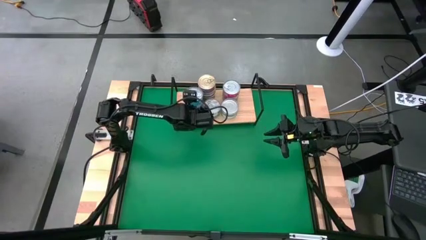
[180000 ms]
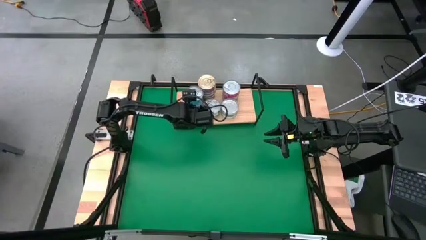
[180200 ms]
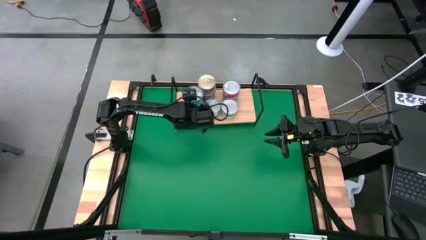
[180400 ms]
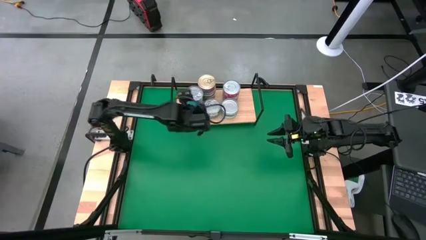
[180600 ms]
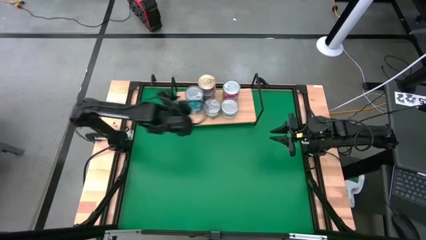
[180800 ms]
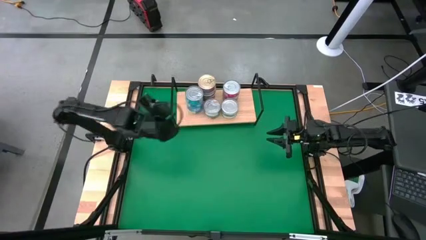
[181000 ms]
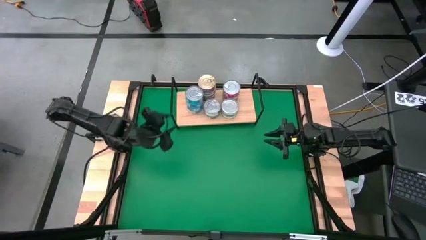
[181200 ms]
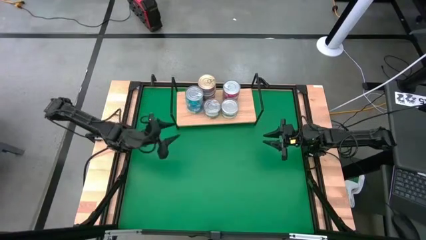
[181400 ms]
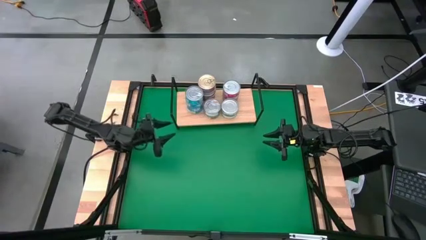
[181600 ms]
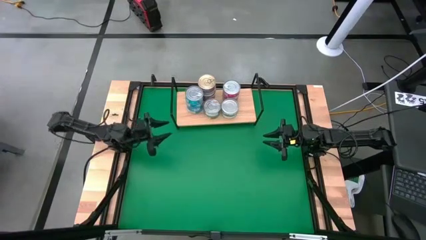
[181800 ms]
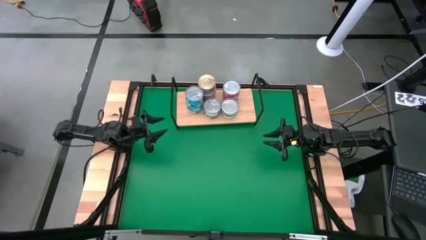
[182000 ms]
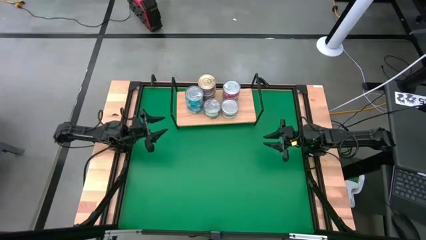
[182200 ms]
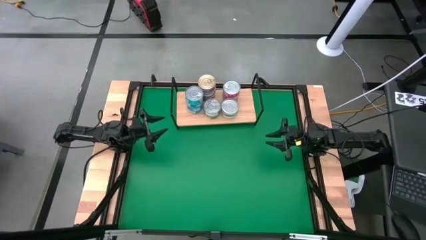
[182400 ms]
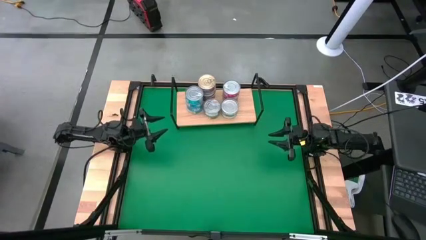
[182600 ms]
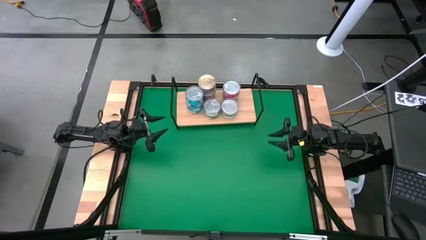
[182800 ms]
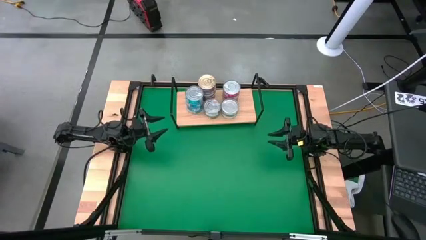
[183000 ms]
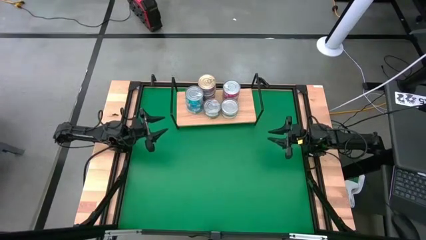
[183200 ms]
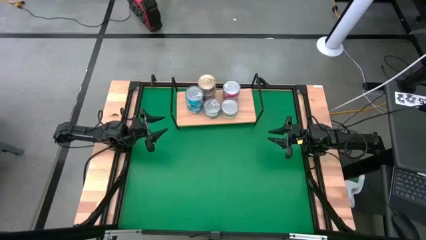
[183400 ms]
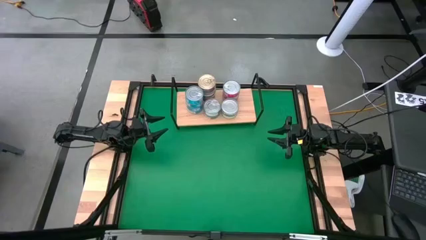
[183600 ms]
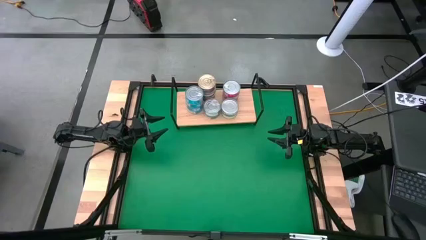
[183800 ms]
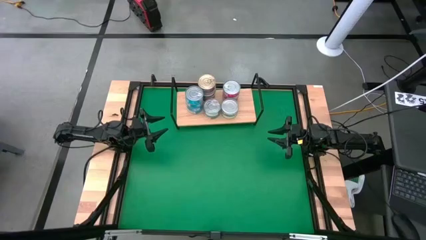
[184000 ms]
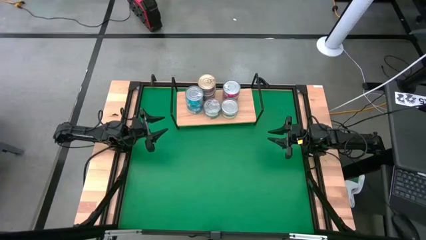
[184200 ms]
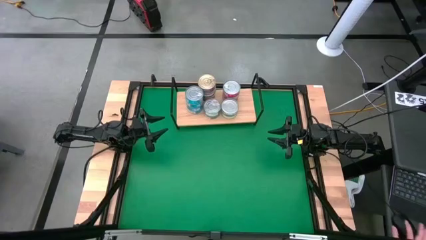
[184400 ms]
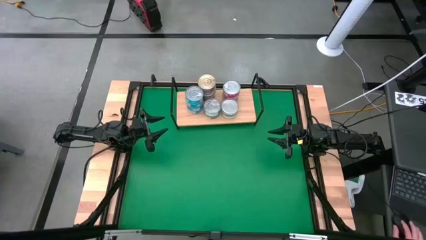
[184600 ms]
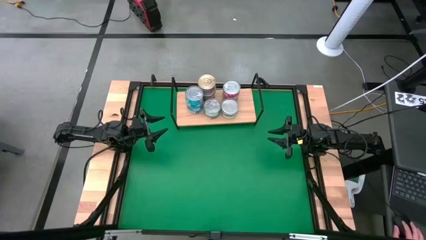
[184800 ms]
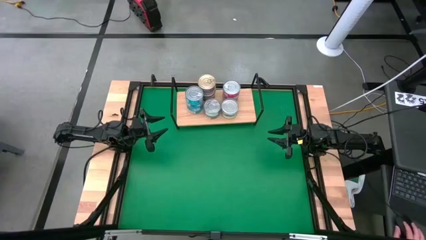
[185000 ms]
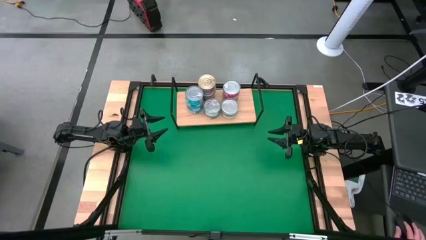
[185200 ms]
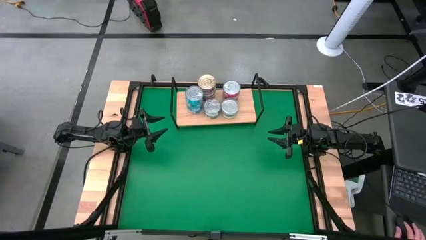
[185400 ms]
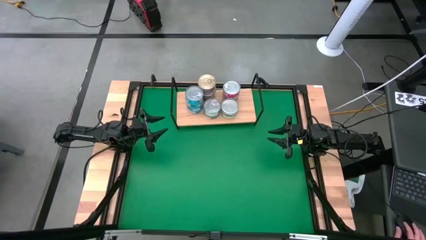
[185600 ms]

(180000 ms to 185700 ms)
Task: Stack canned seafood by type on shelf
Return to Home Position

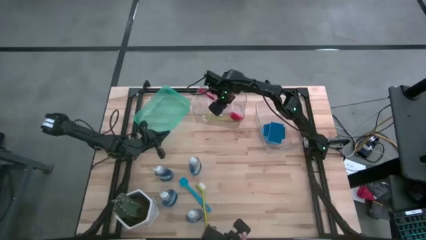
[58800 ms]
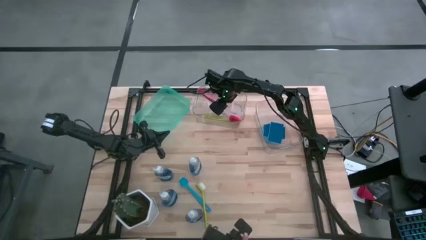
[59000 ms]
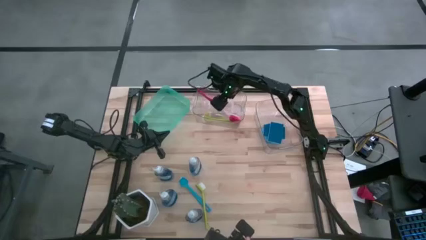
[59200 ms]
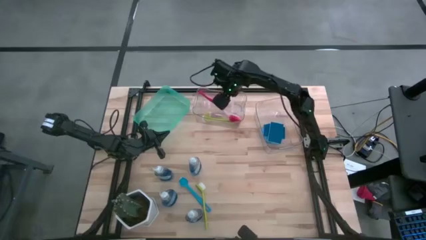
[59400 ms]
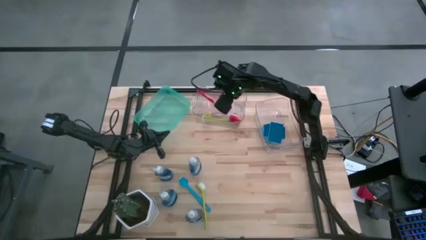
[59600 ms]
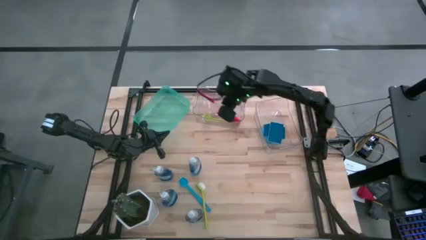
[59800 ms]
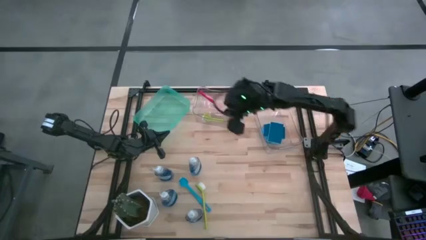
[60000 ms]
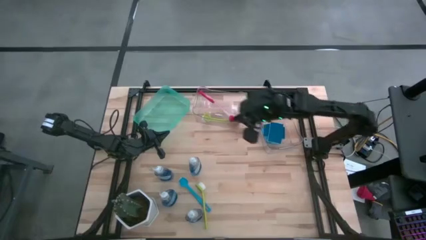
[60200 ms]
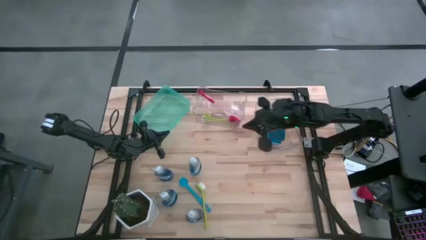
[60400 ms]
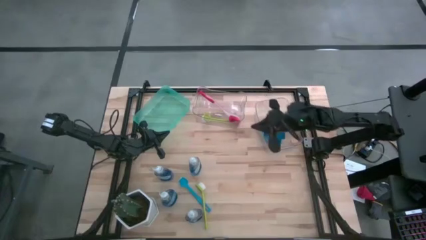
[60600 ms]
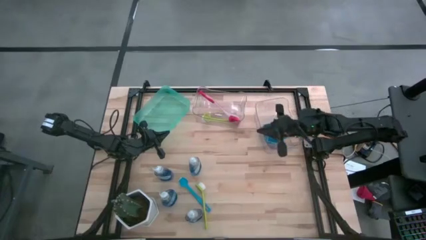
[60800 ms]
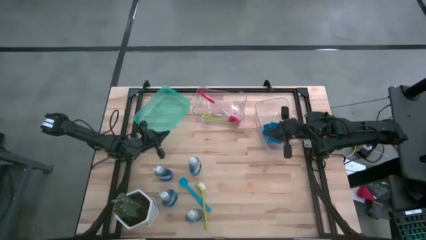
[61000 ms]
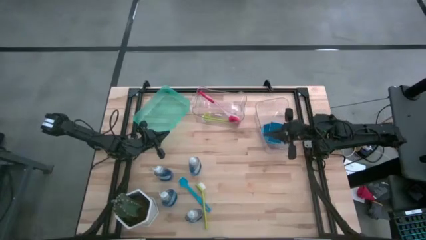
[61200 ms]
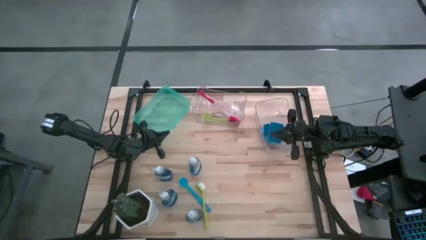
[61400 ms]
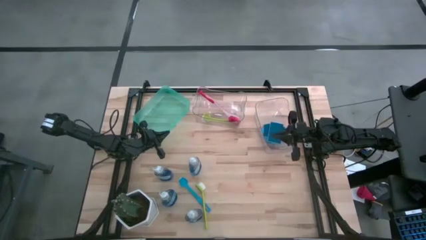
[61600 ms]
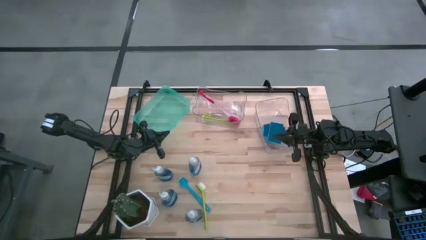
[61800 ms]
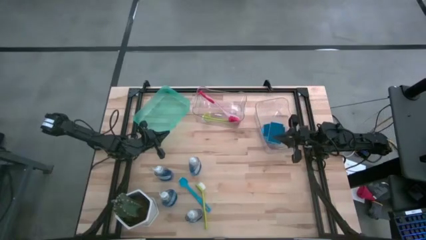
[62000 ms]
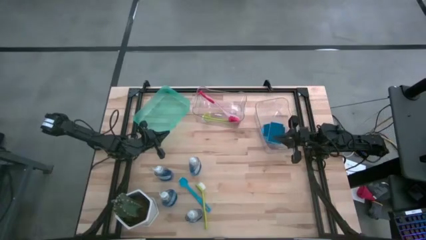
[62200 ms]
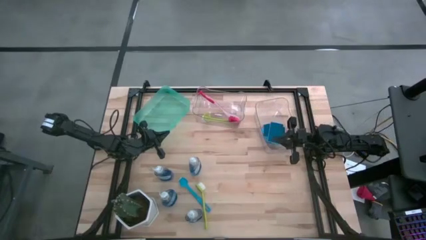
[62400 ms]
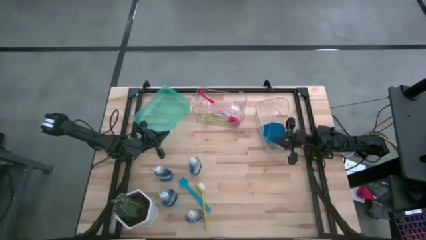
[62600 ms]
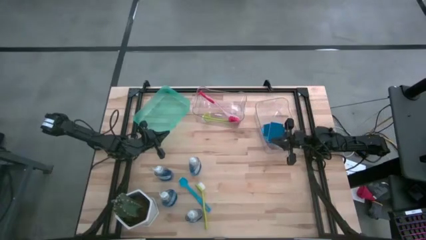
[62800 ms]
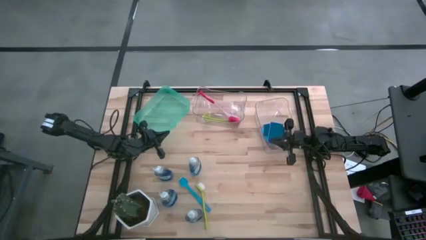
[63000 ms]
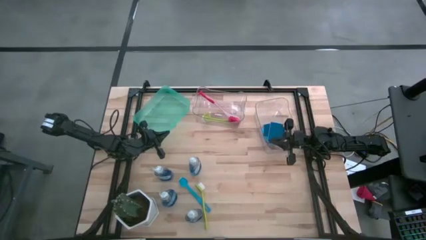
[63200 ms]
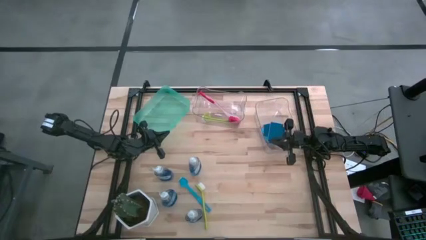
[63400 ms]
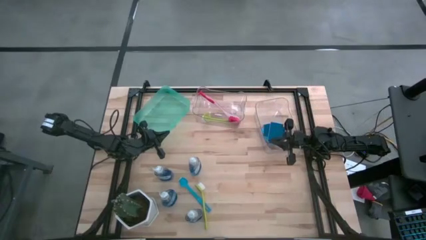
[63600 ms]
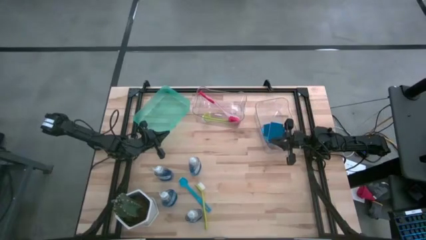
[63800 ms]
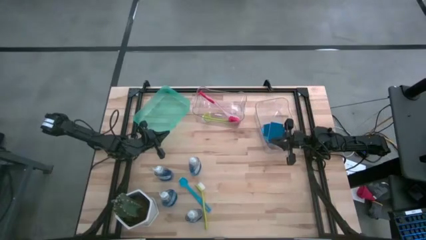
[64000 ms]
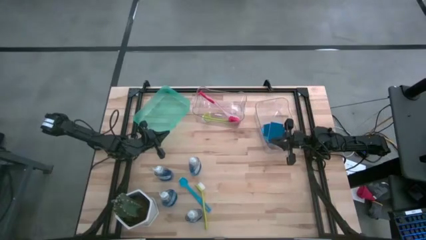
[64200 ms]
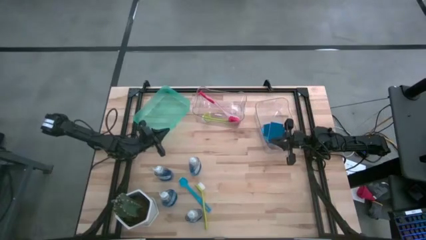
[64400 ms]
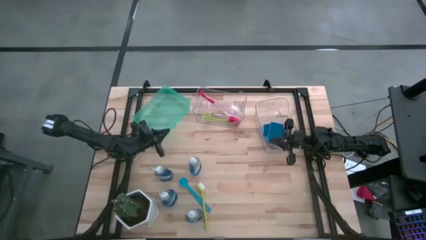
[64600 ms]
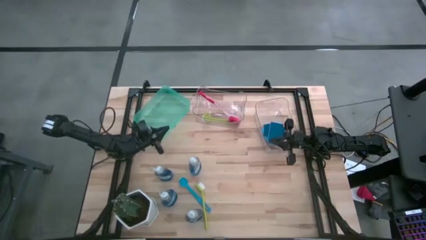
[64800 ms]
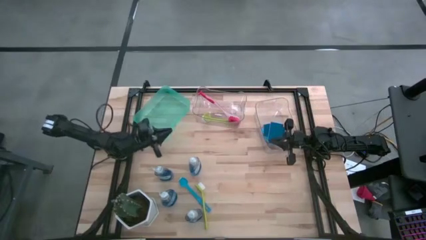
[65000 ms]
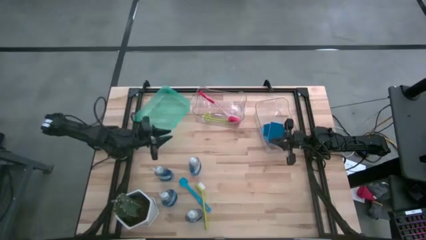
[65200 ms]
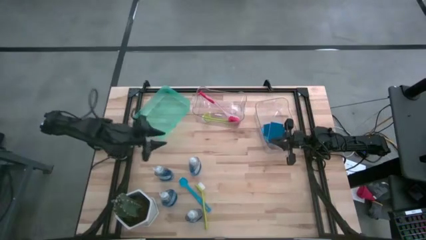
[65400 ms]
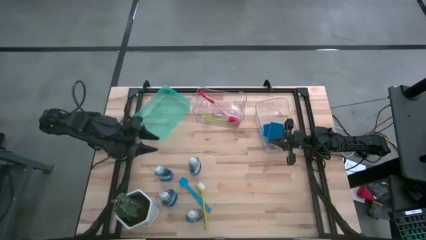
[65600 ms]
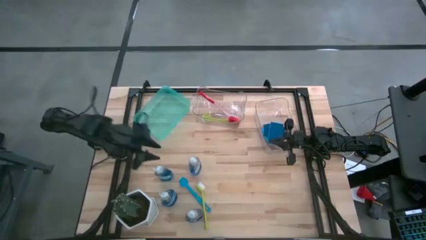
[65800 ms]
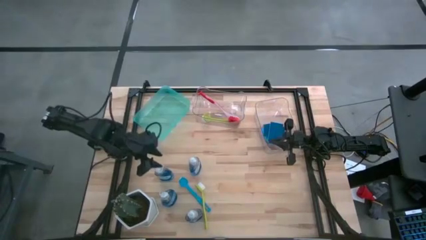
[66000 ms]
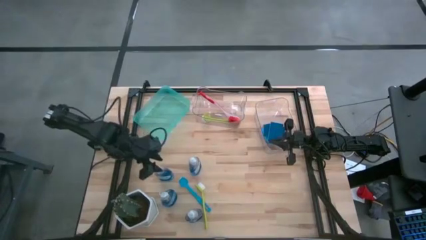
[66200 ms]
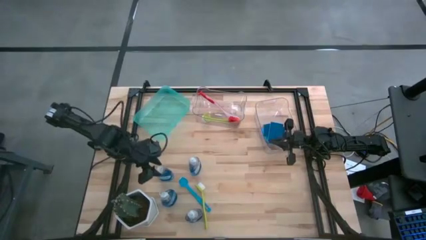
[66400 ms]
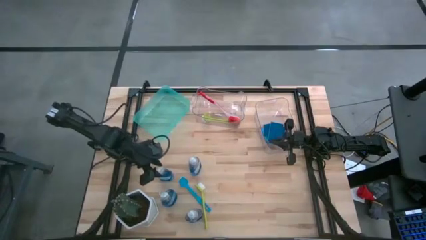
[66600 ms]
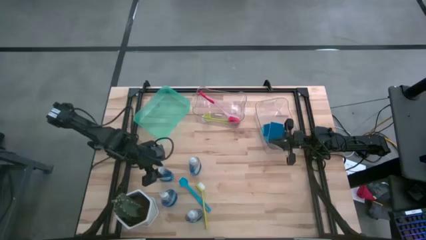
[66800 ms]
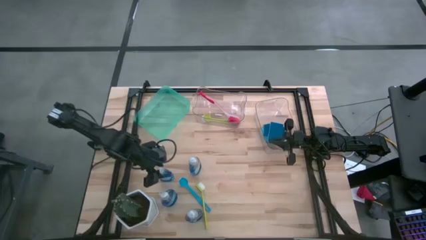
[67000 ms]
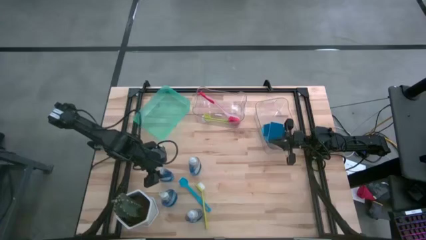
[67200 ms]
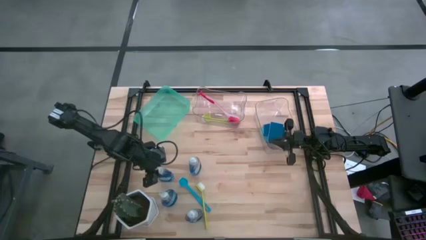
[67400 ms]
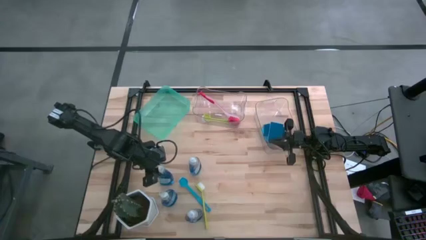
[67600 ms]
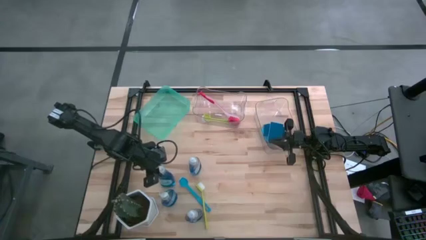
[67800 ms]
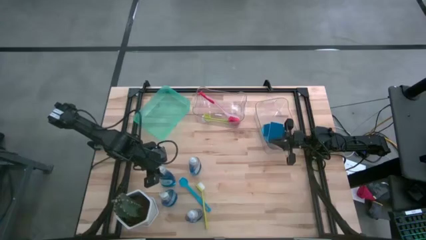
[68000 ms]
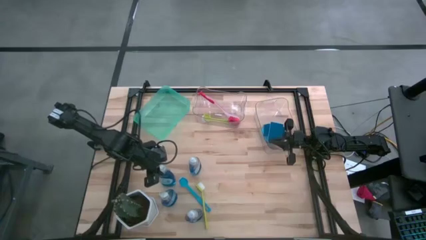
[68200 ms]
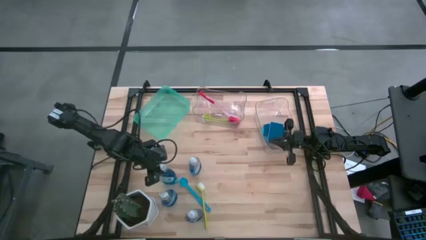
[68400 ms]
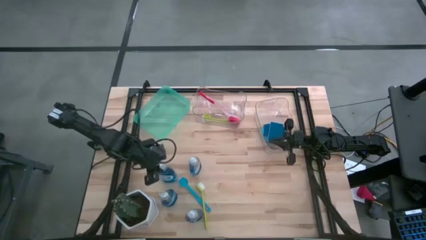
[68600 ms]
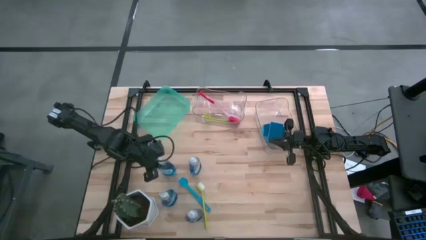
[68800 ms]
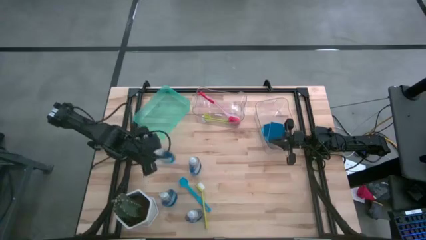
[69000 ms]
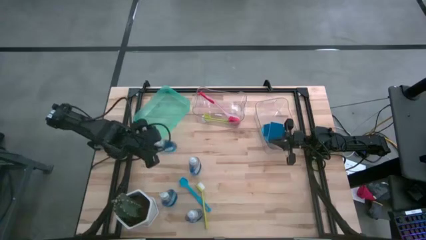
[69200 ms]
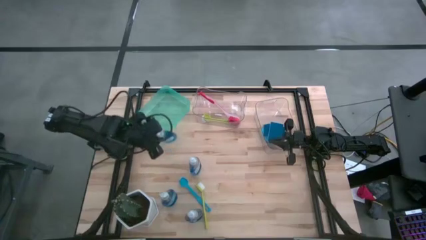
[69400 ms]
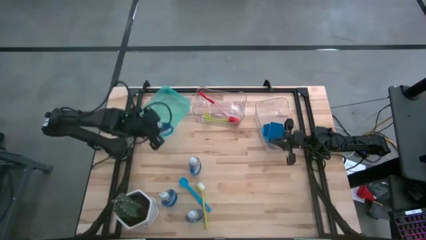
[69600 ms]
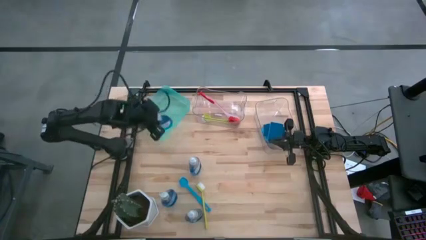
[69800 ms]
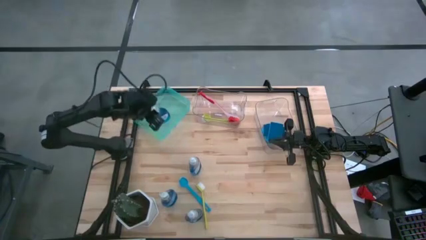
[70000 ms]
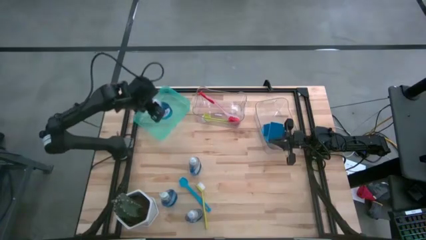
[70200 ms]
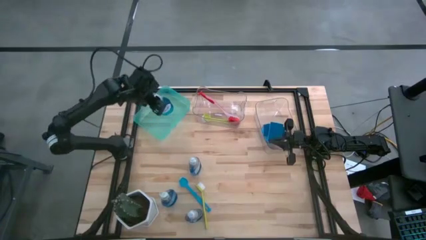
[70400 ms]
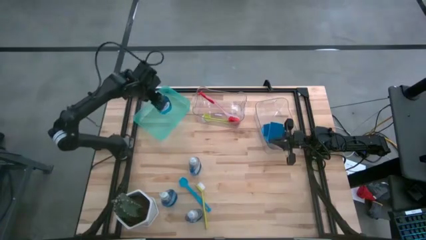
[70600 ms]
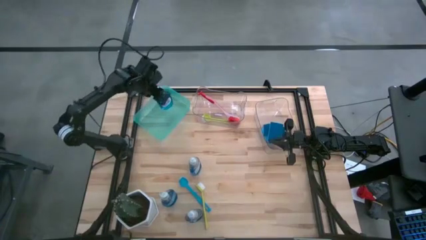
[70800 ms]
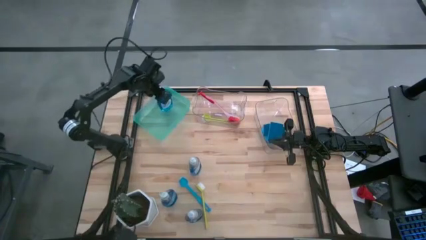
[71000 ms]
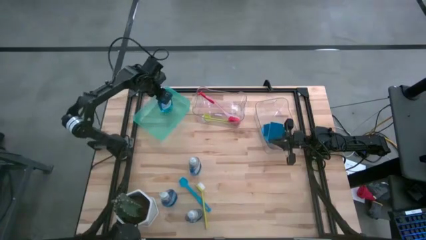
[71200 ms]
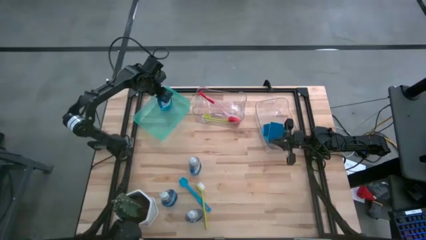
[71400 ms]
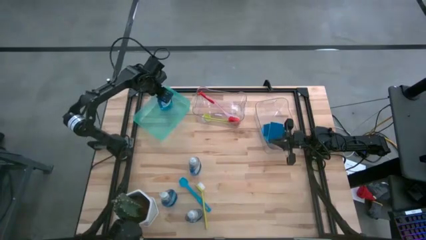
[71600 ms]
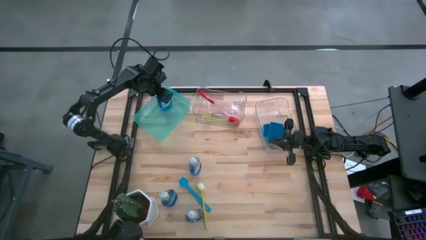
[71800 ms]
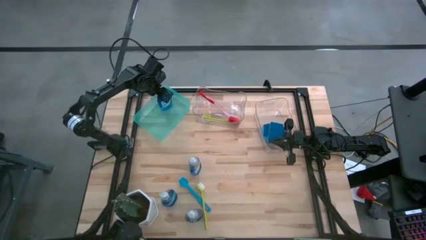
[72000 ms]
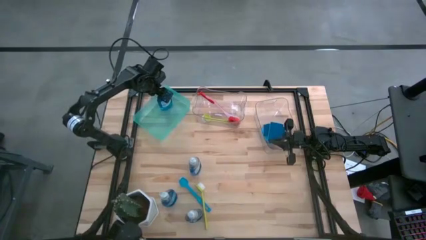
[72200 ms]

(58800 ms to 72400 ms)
Task: Pick & Place Kitchen Sink Supplies
Put the transparent soap dispenser in the green bin
